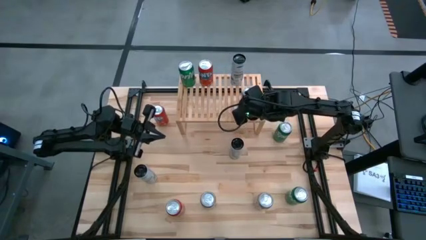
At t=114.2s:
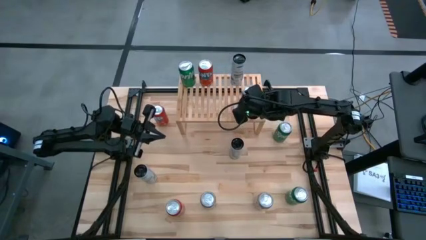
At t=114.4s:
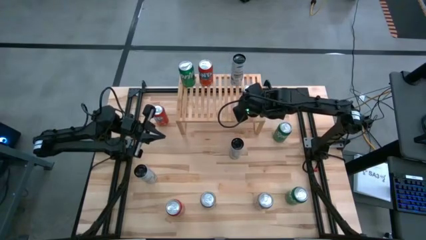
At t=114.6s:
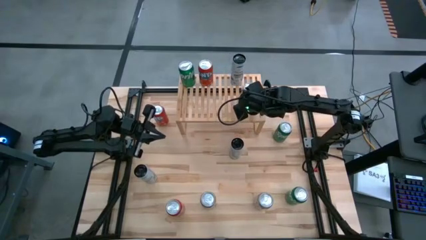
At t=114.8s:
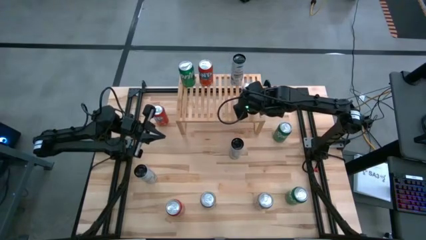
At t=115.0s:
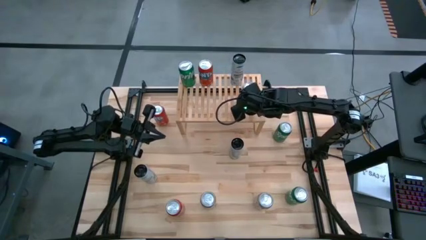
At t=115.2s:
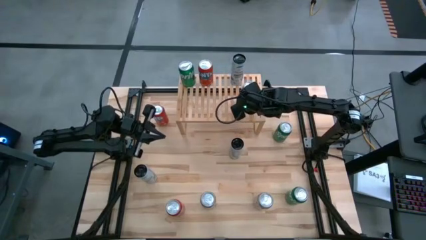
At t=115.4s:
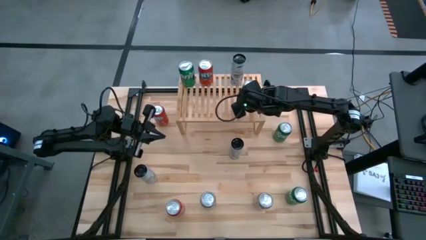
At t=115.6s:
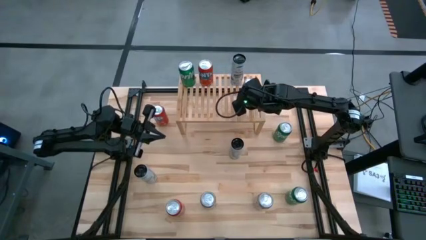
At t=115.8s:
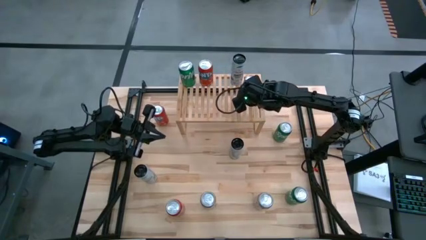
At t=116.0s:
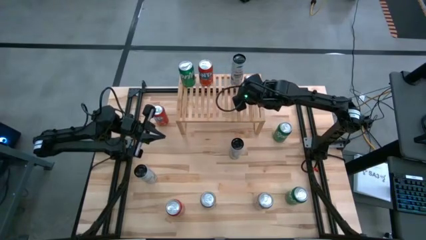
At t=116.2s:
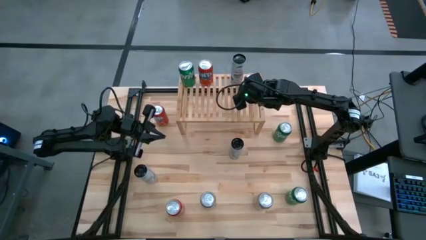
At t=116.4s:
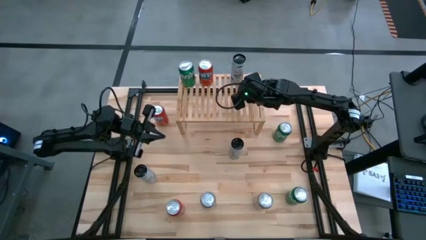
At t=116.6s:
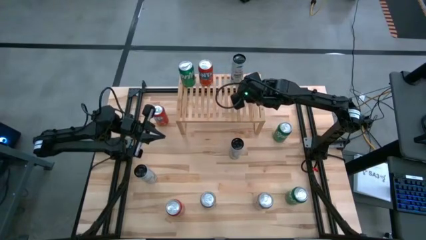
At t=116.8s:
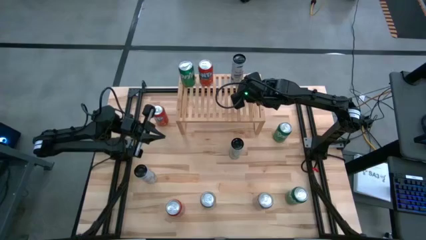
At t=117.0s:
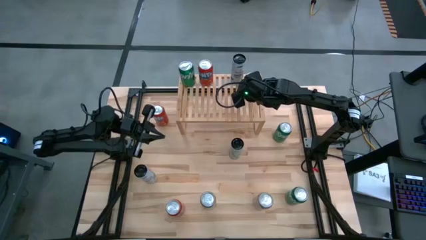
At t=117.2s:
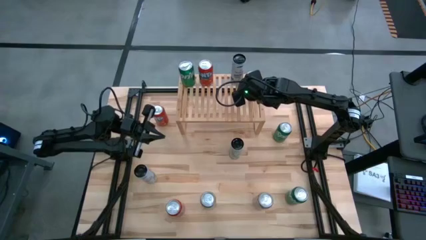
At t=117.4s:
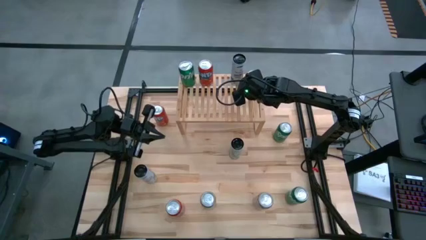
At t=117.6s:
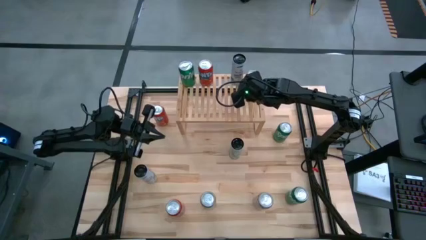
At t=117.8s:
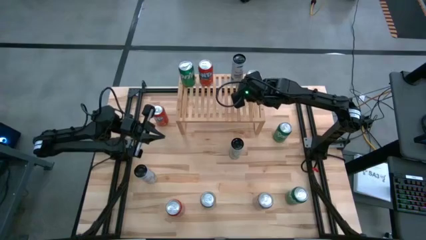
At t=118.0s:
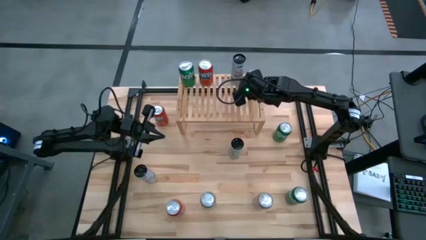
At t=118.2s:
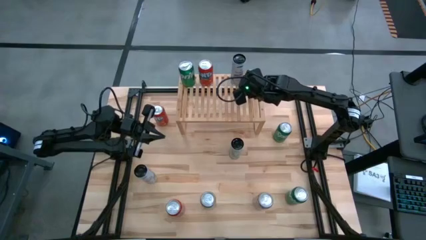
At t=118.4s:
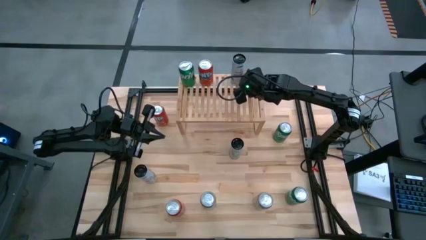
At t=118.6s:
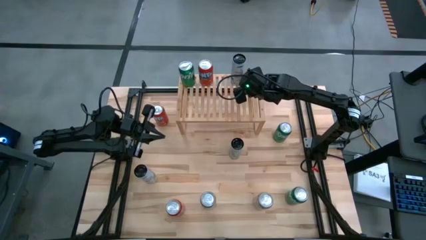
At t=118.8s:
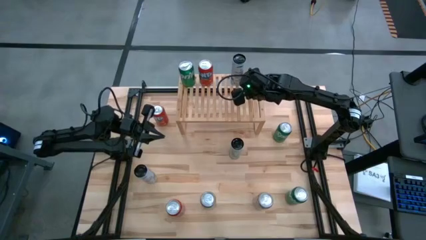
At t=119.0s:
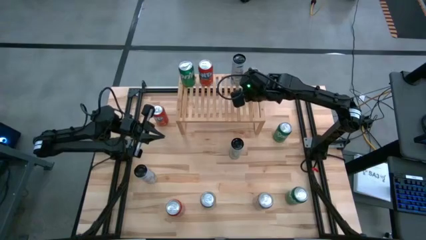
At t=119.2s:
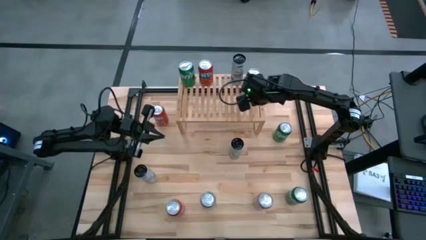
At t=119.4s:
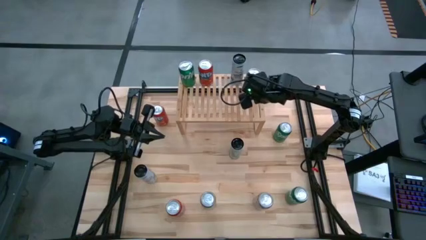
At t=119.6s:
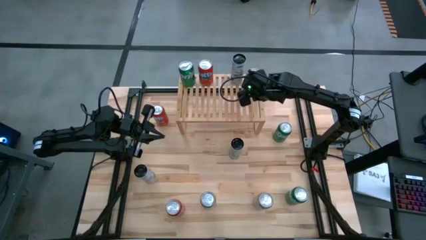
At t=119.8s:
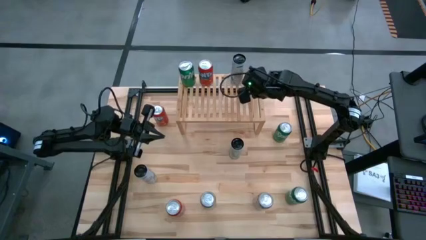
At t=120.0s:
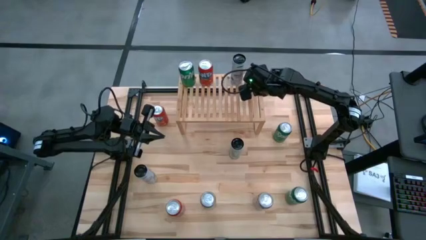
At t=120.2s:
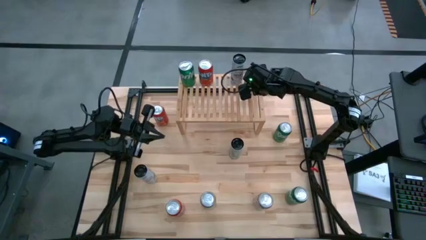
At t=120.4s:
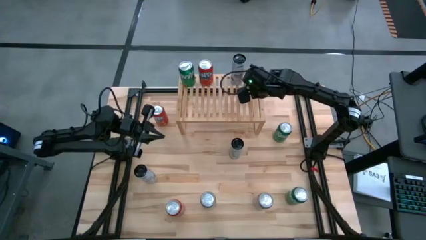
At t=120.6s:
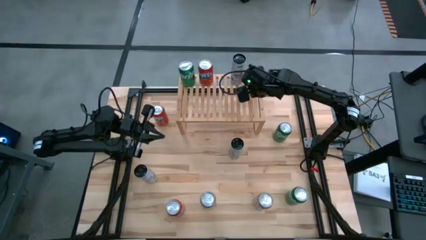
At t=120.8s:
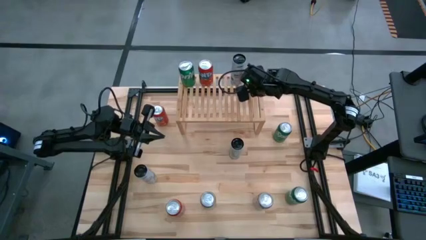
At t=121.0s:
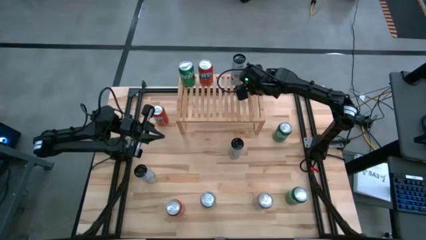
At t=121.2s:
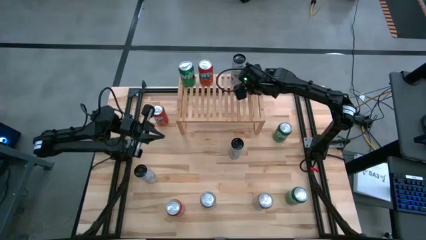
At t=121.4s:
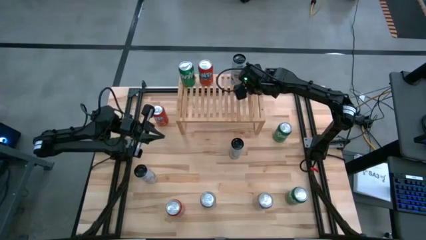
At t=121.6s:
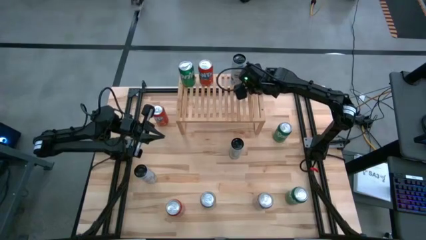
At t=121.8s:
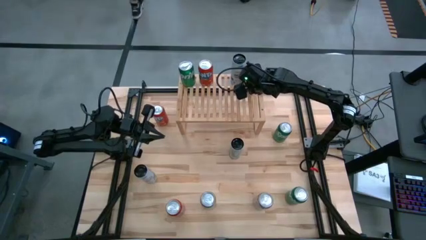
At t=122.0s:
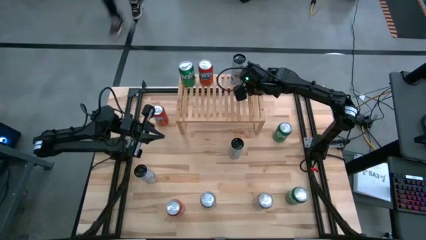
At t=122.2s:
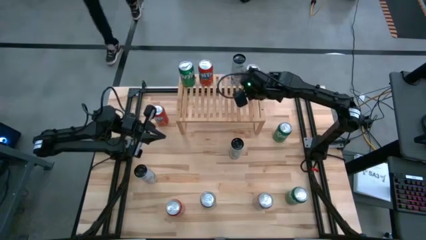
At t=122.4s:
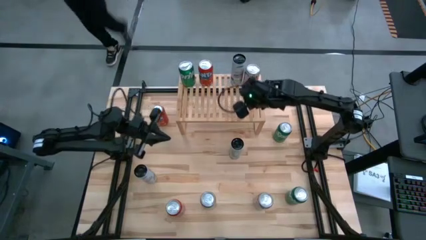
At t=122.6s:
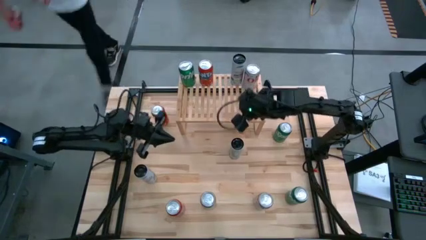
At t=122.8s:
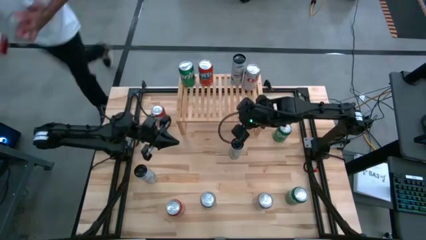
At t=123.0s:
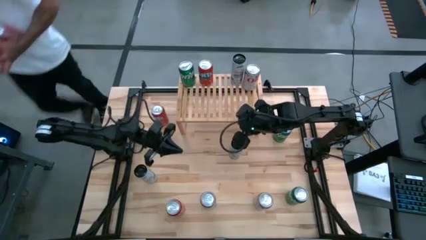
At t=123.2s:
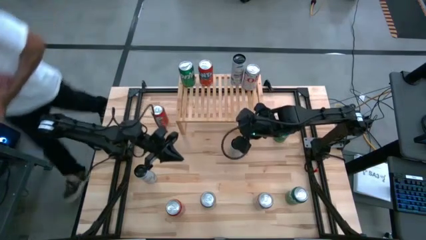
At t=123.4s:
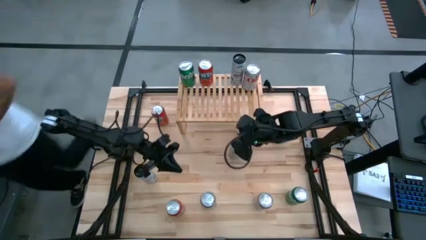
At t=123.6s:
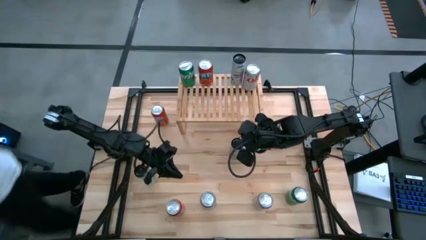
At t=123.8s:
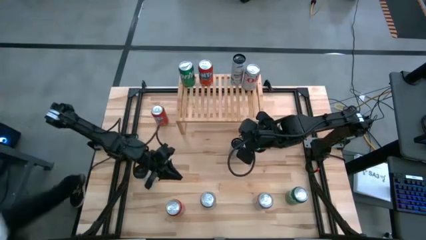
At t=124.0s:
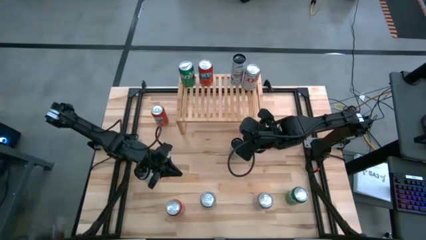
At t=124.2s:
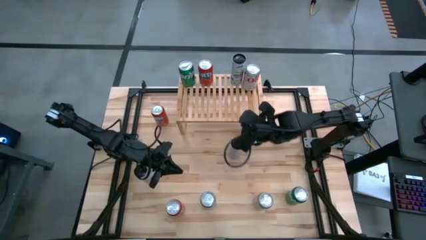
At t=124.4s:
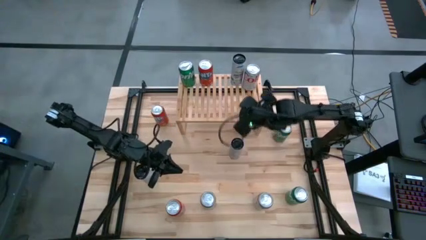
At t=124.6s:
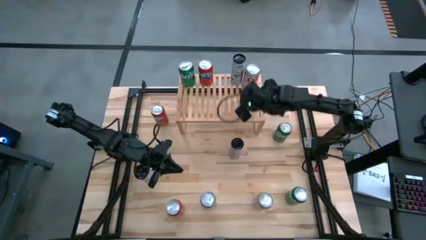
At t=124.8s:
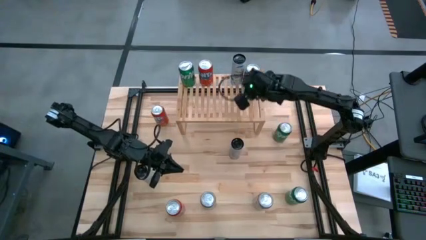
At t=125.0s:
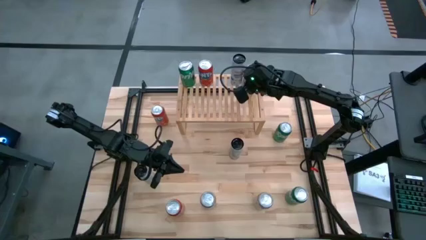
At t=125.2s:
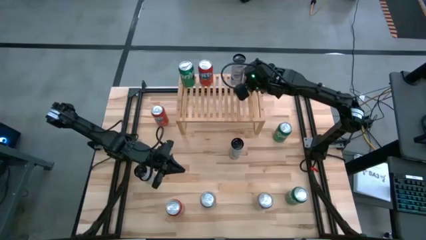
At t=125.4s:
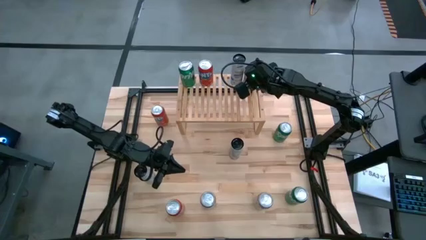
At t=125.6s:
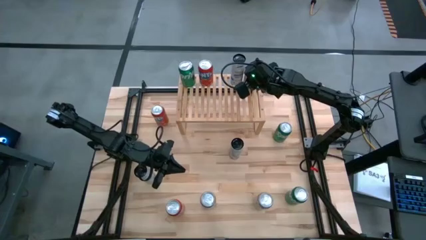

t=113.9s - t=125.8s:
Task: Place canned beverage on shelf
Put the top red silver soda can on the shelf
